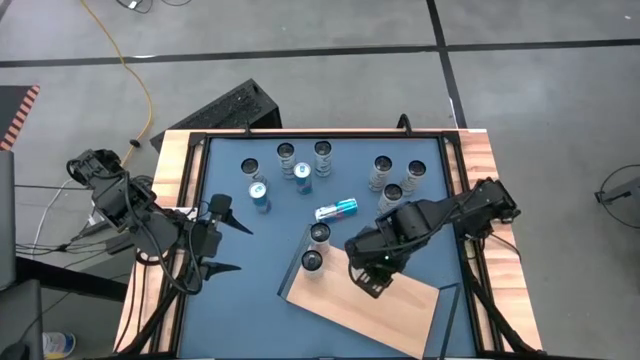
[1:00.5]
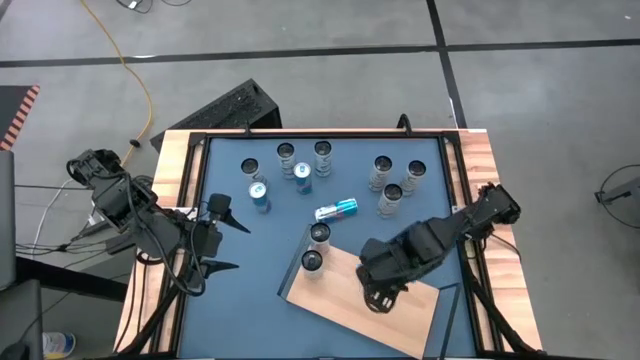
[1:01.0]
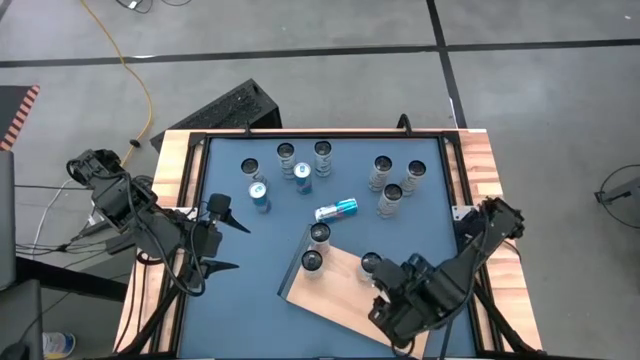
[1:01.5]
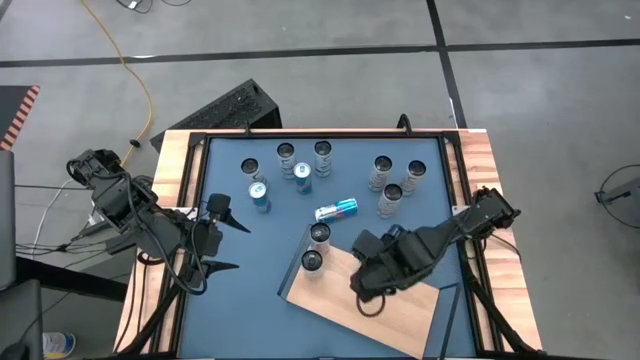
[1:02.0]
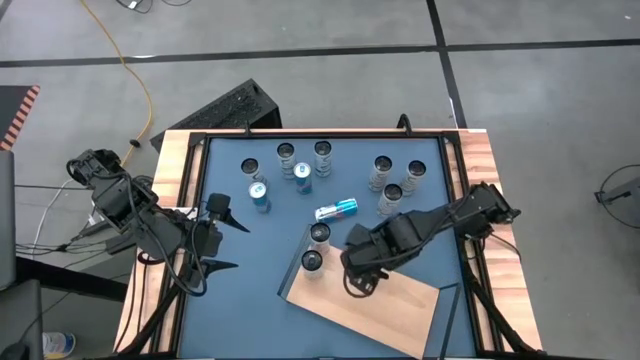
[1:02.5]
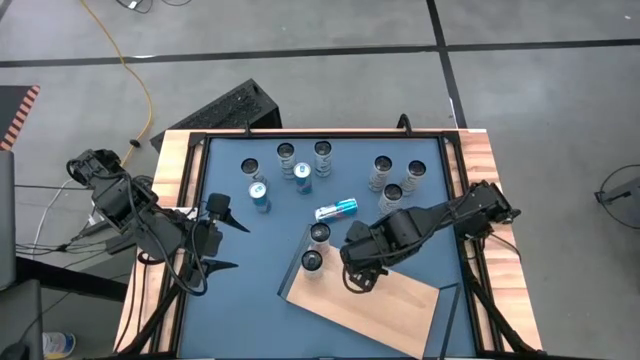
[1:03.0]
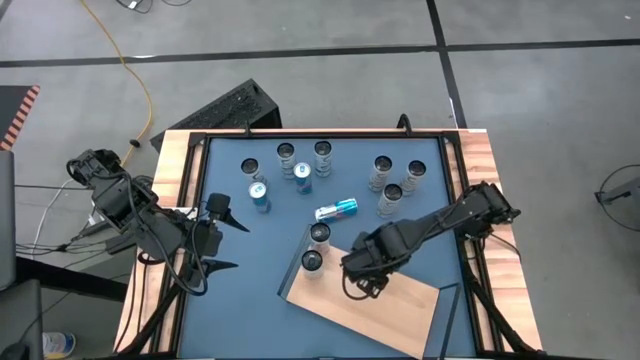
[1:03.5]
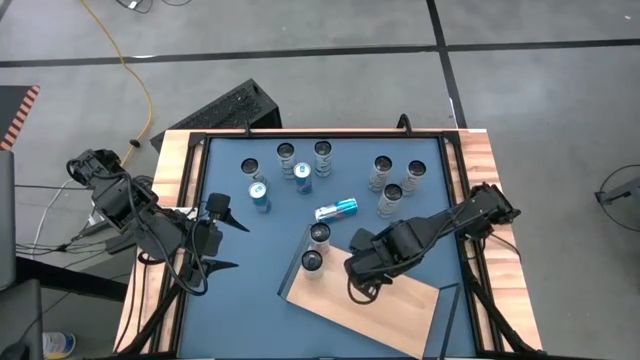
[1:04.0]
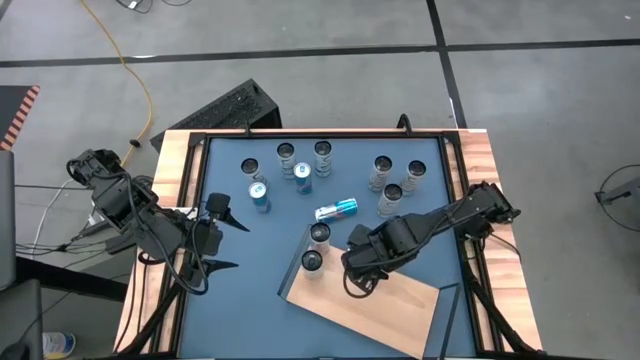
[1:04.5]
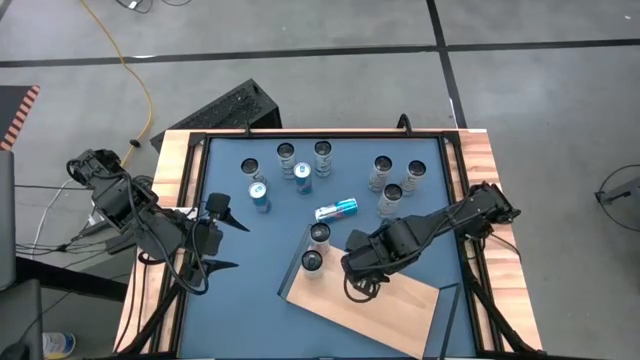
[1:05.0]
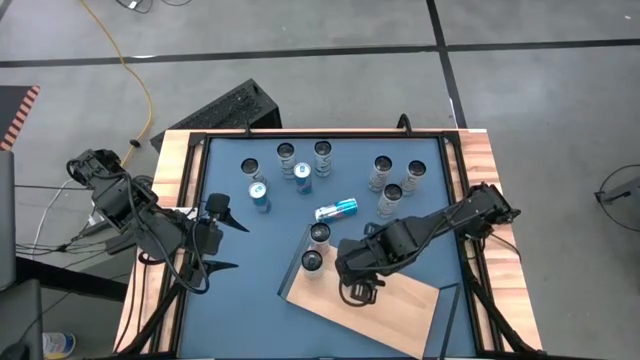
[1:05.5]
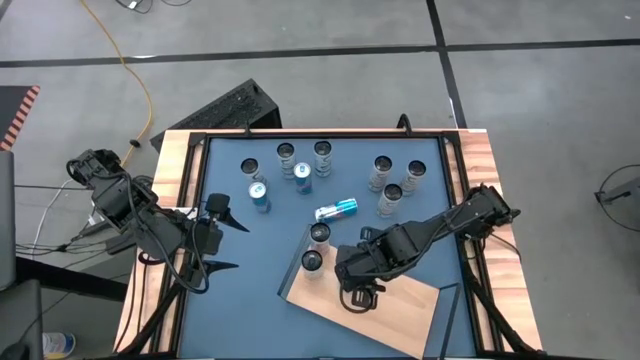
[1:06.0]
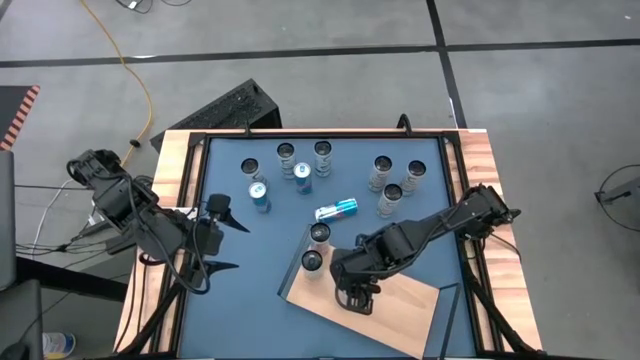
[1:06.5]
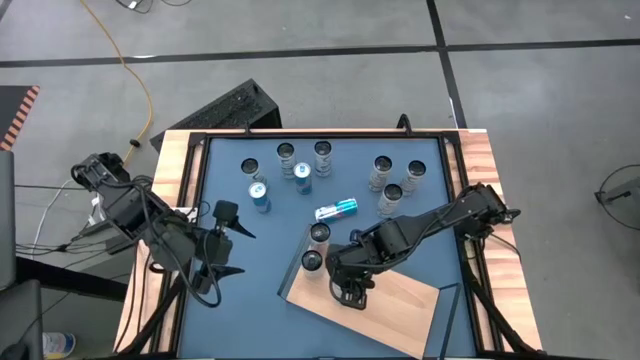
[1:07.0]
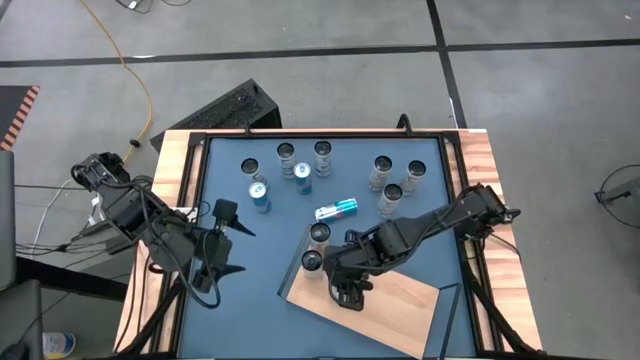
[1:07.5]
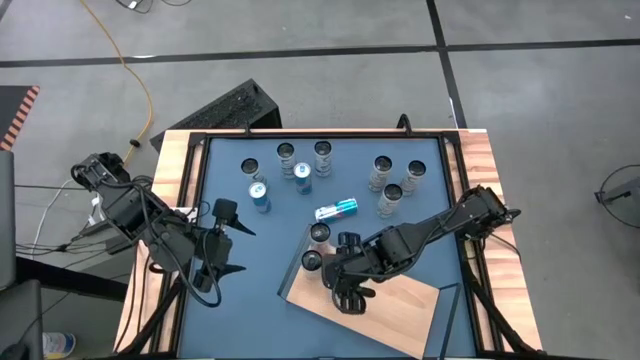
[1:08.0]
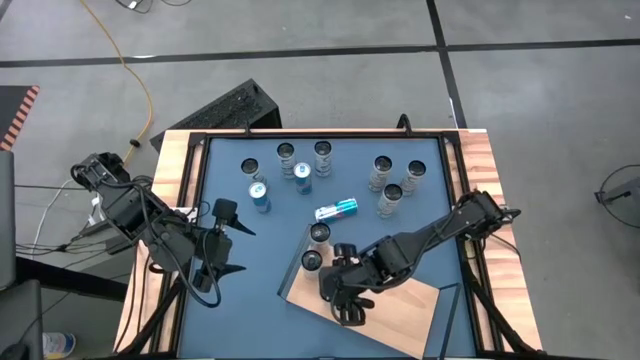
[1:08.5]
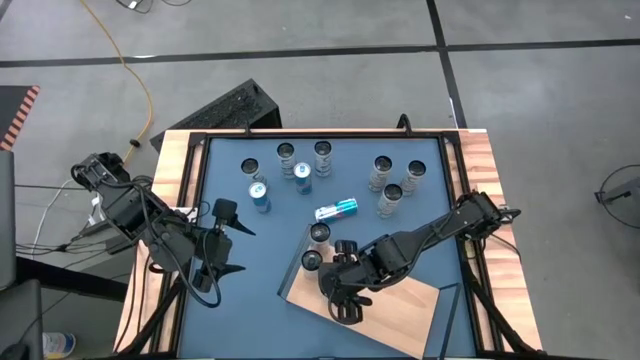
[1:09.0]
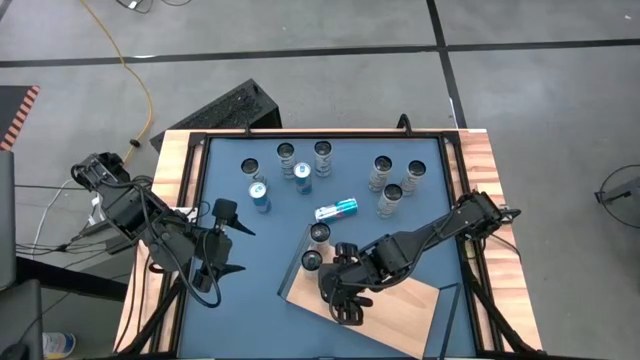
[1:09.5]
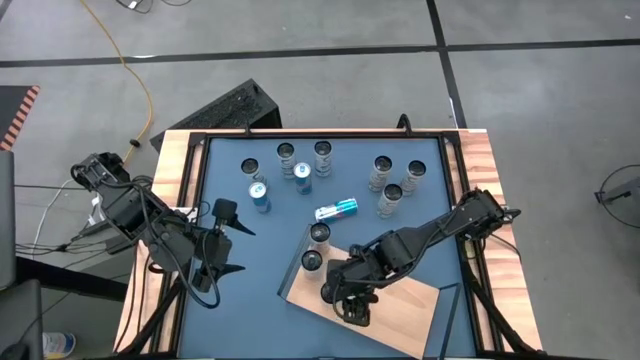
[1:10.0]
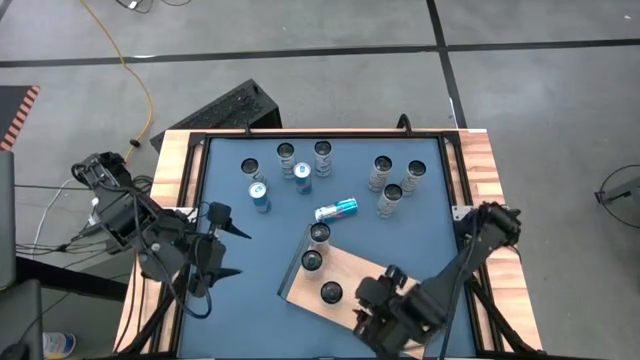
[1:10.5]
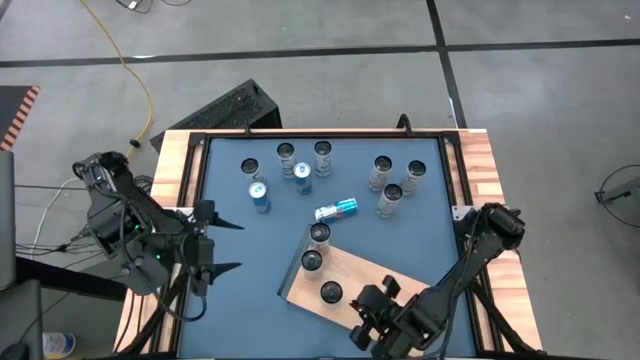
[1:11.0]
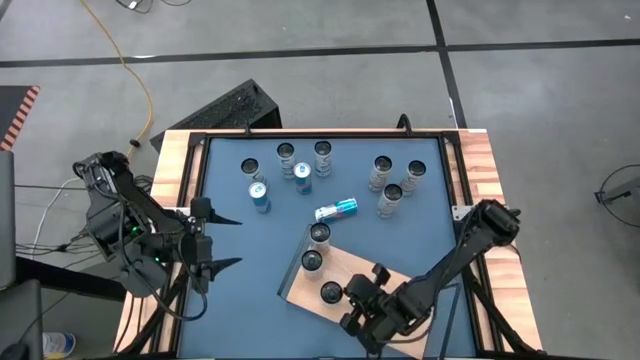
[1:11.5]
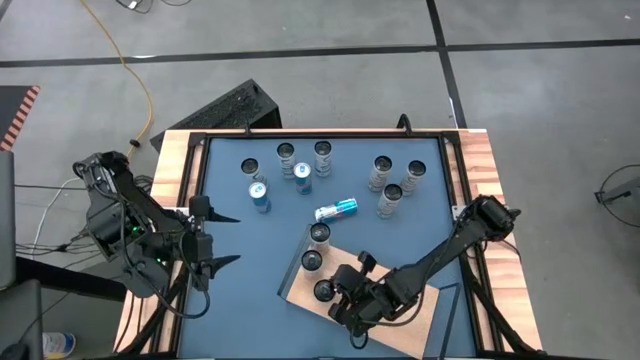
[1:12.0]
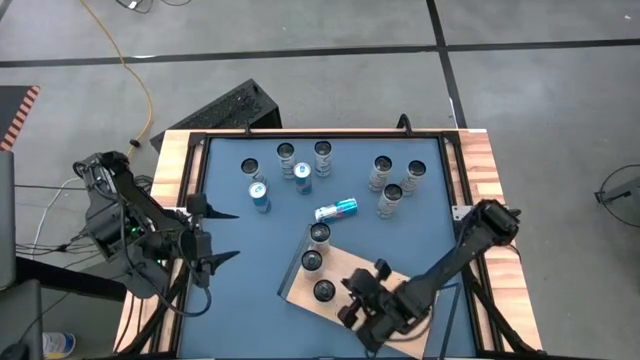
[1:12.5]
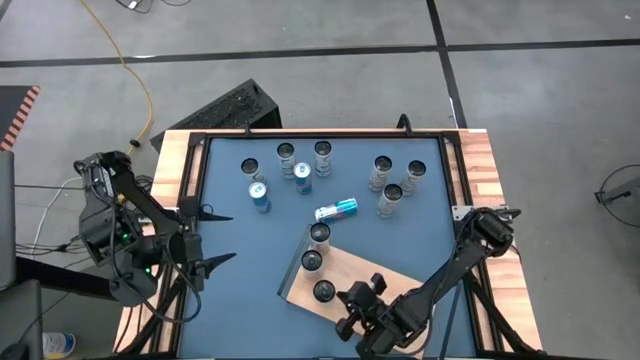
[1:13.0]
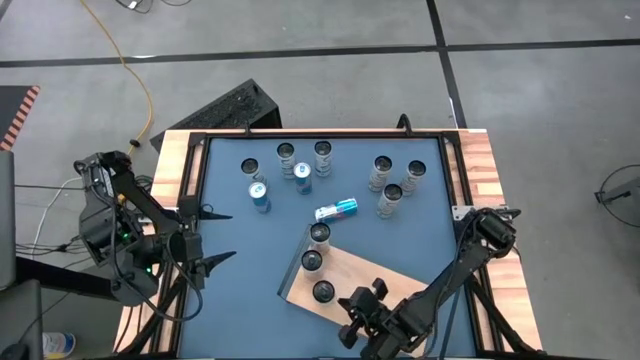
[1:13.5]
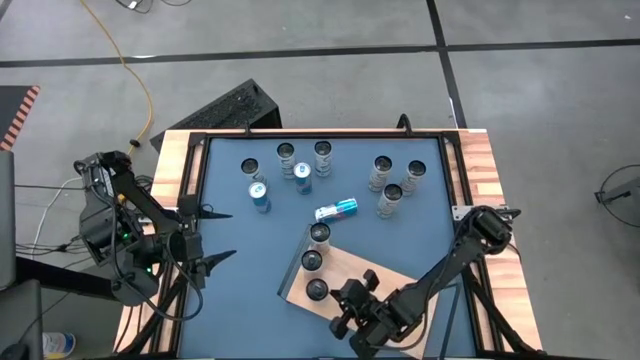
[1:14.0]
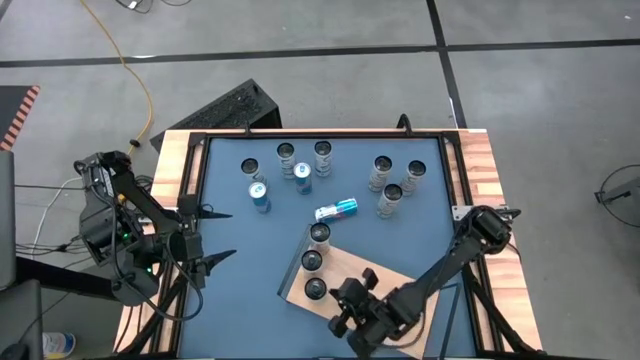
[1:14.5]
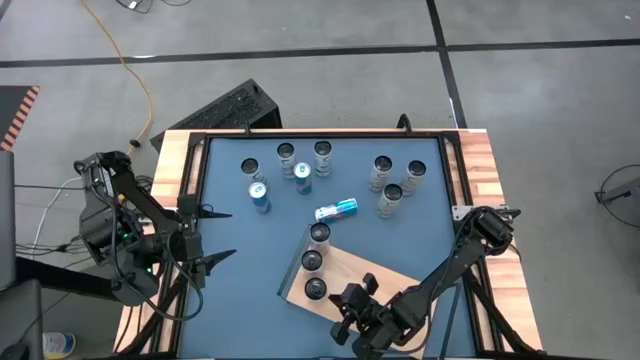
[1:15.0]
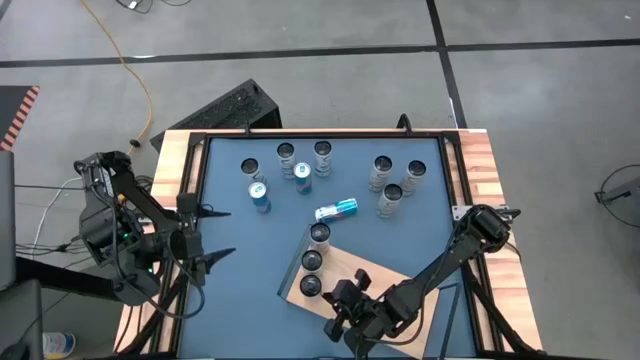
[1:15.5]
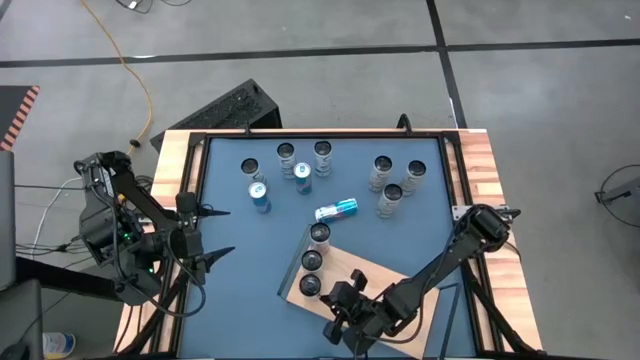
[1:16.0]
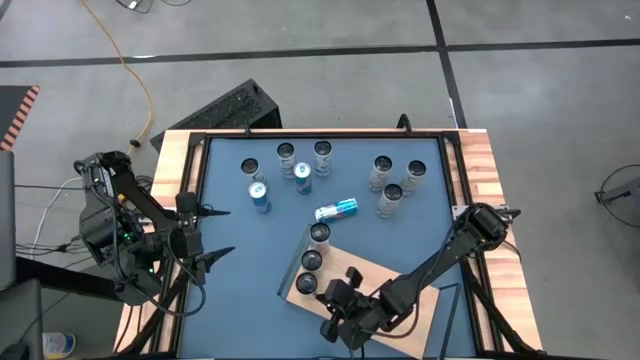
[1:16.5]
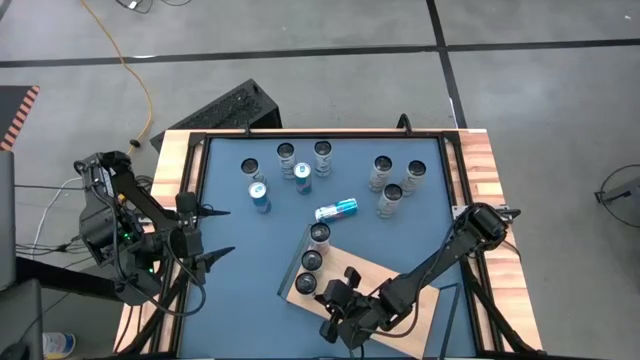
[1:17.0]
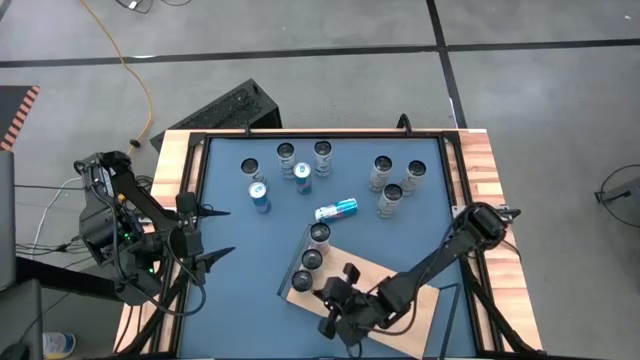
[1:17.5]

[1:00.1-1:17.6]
Task: Place canned beverage on shelf
Put the white pink soda can aligned with the other white pink soda cans on the shelf

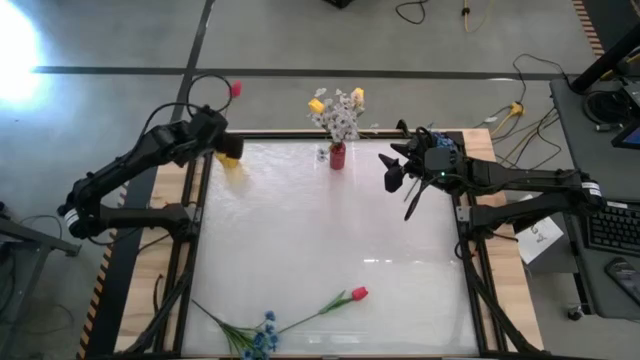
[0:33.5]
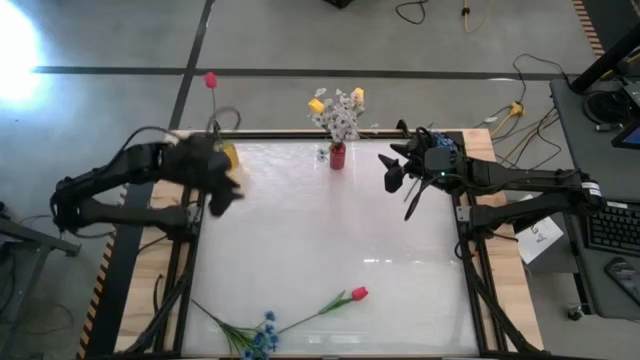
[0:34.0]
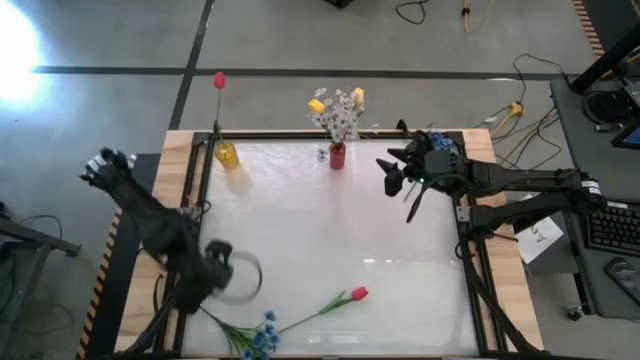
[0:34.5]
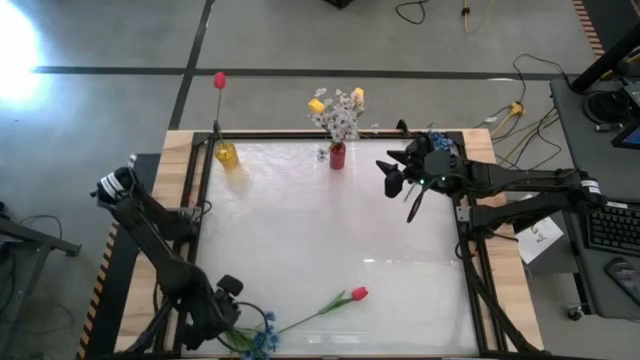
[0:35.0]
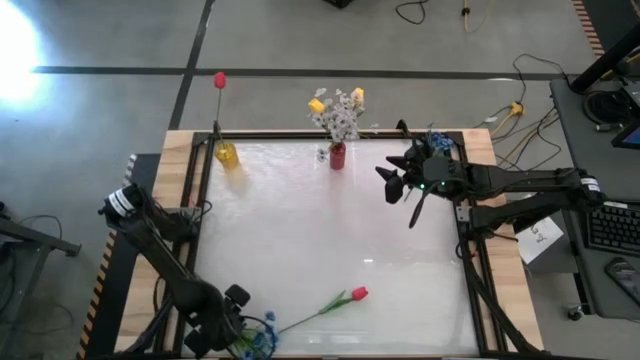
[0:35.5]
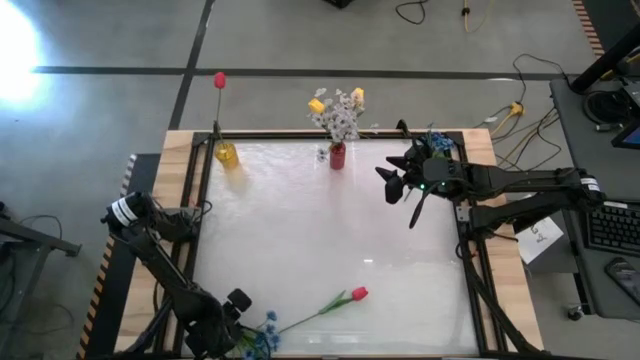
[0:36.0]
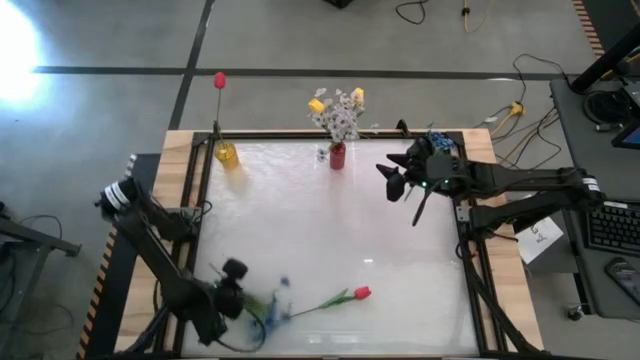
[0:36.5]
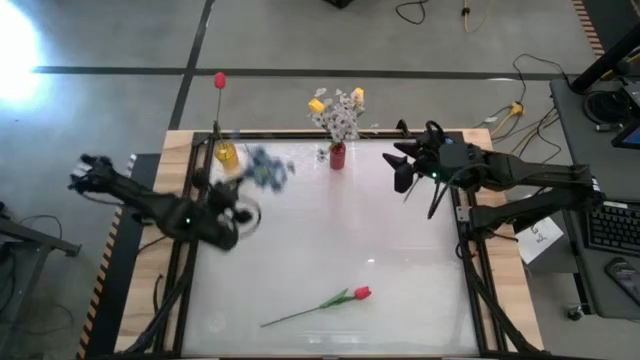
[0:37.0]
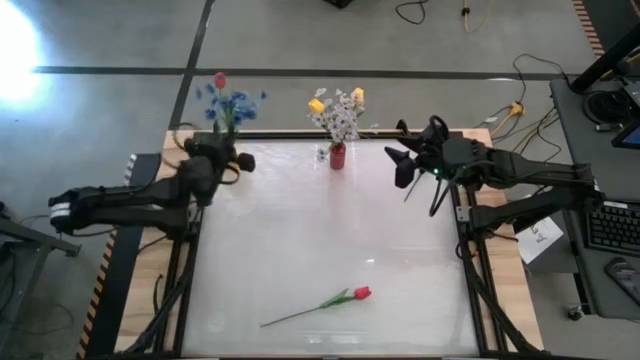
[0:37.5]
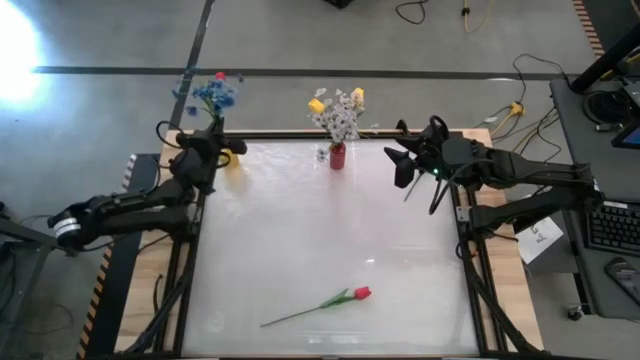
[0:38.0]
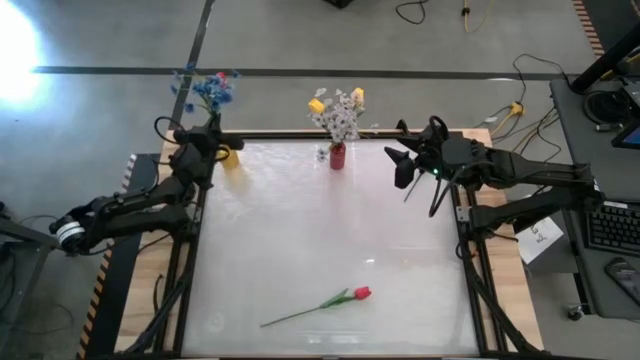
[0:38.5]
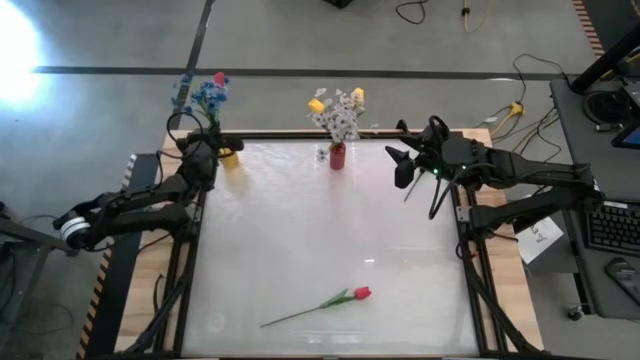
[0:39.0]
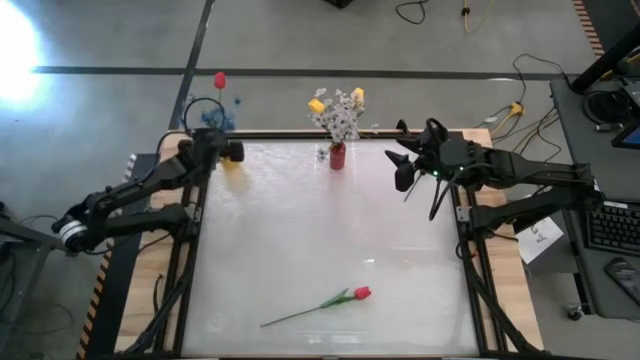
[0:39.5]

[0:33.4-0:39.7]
Task: Sort flowers into vase by color
Put the bottom blue flowers into the yellow vase
